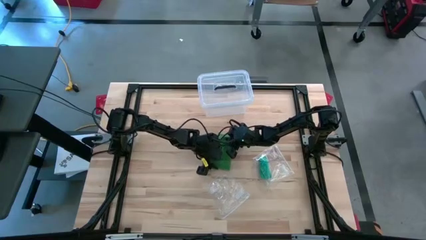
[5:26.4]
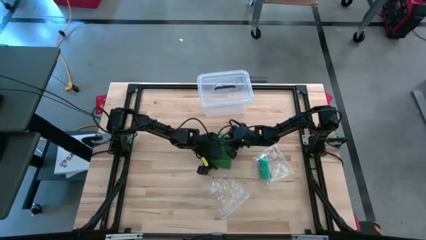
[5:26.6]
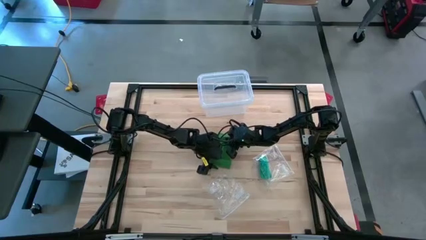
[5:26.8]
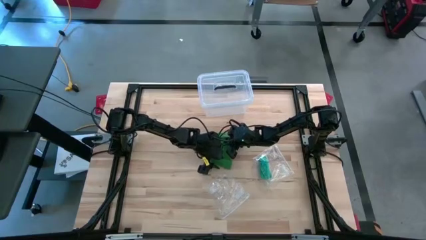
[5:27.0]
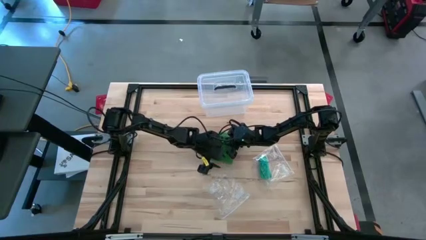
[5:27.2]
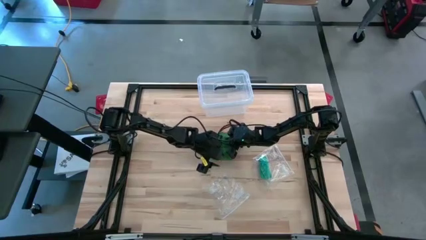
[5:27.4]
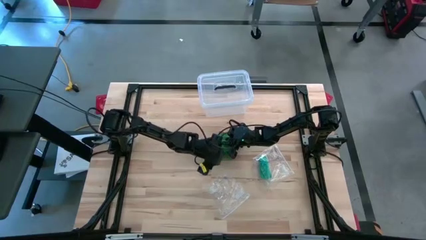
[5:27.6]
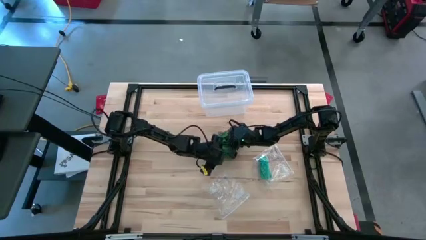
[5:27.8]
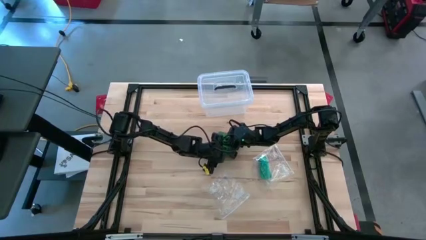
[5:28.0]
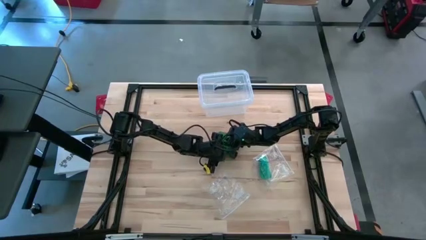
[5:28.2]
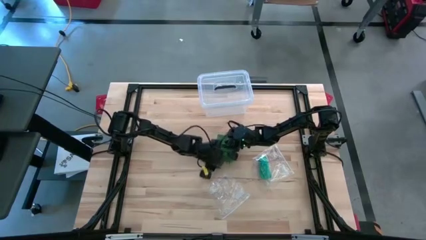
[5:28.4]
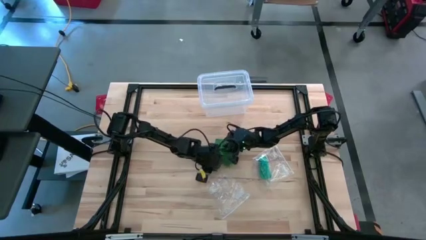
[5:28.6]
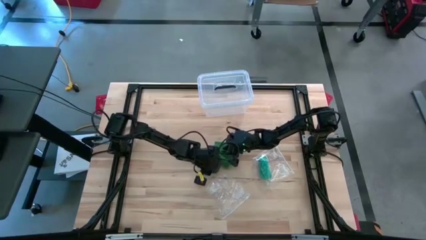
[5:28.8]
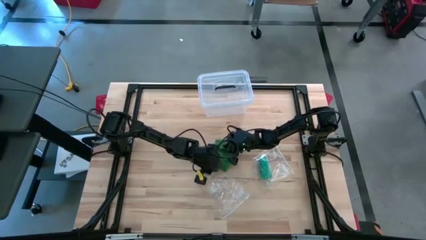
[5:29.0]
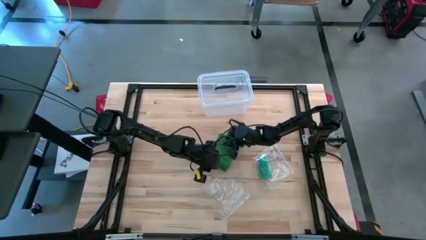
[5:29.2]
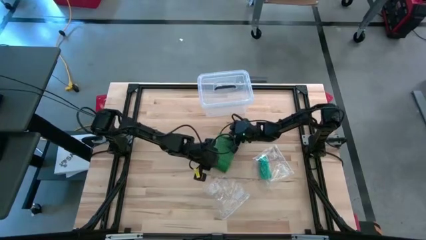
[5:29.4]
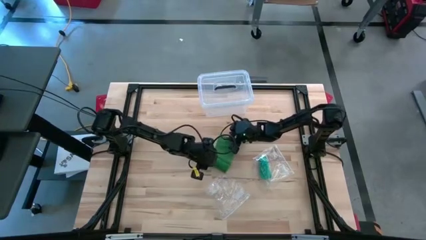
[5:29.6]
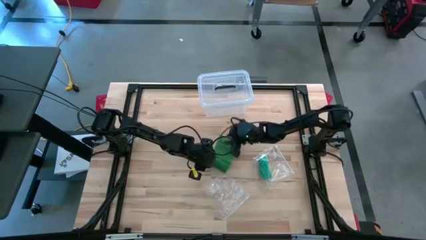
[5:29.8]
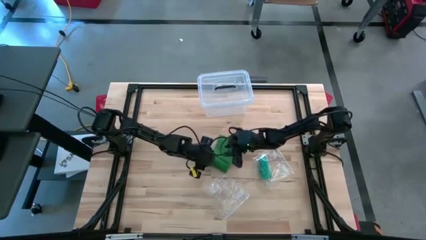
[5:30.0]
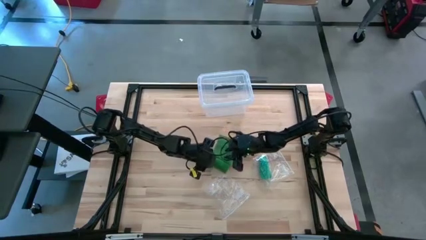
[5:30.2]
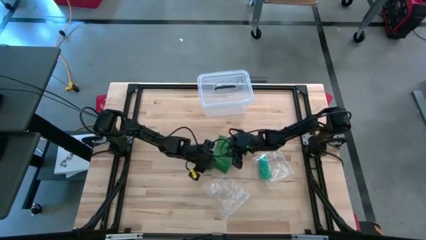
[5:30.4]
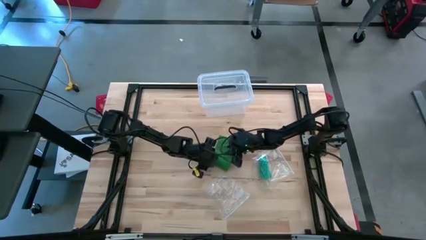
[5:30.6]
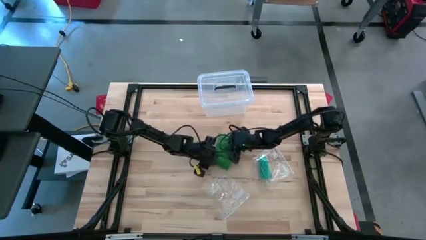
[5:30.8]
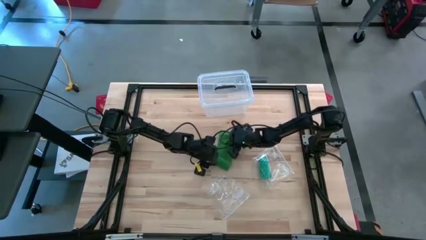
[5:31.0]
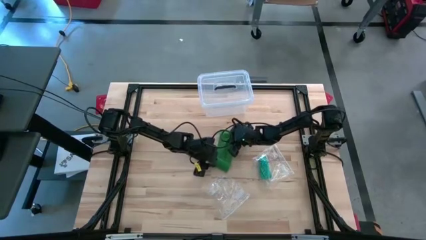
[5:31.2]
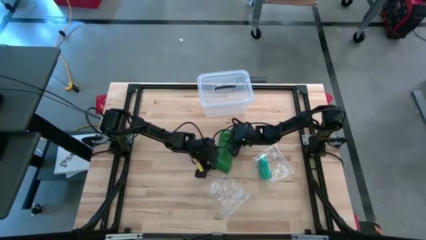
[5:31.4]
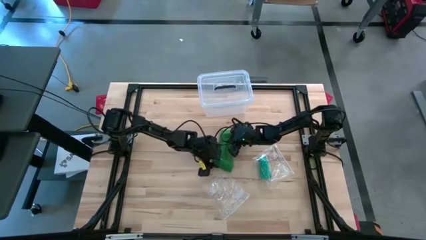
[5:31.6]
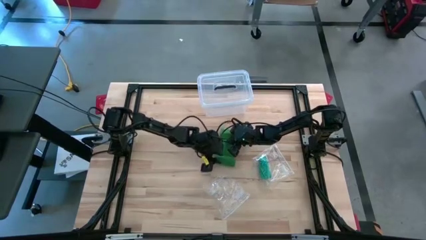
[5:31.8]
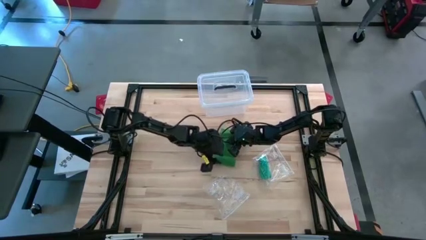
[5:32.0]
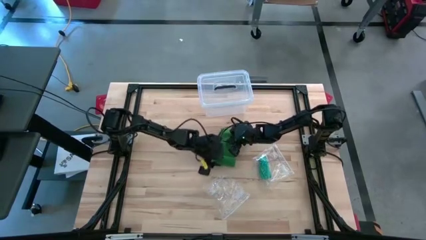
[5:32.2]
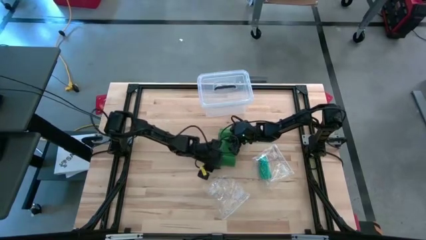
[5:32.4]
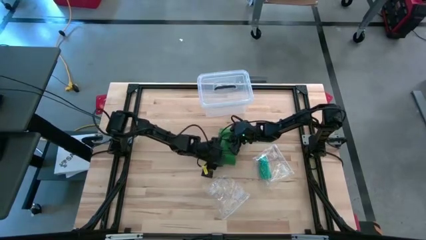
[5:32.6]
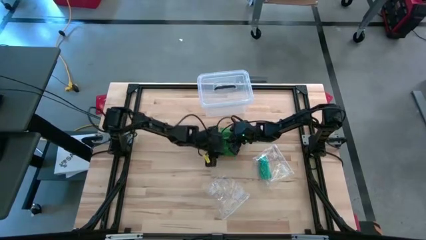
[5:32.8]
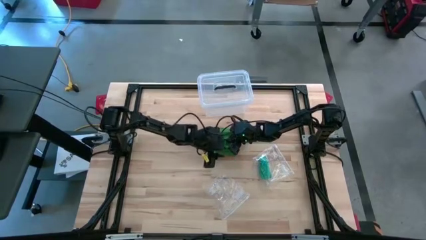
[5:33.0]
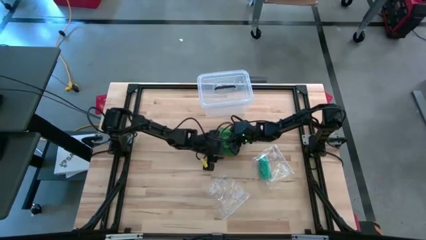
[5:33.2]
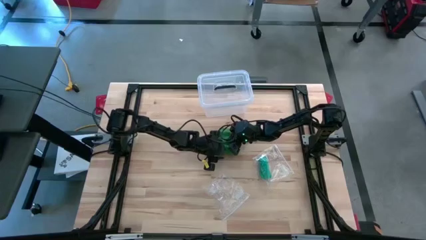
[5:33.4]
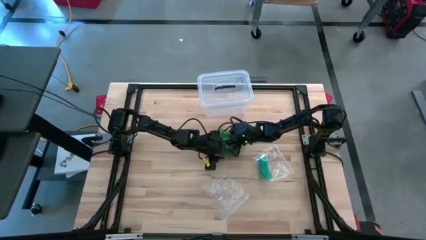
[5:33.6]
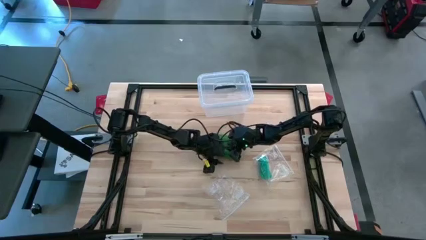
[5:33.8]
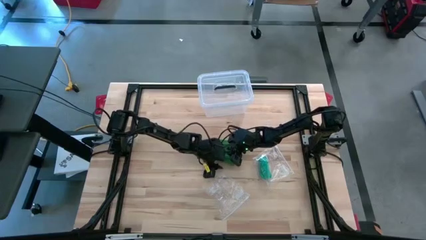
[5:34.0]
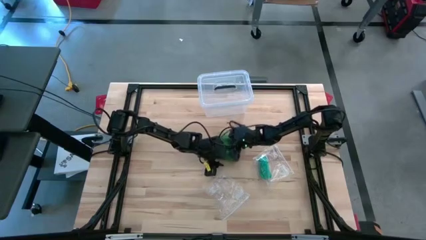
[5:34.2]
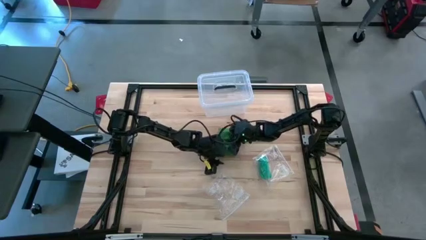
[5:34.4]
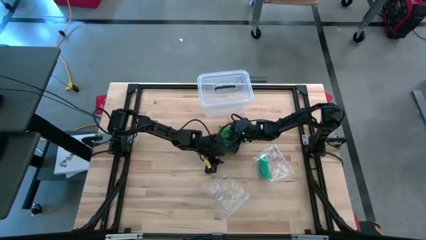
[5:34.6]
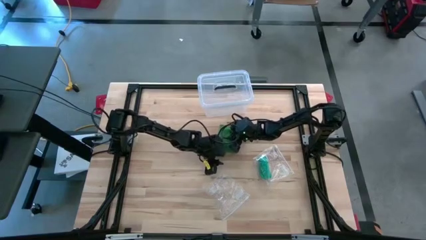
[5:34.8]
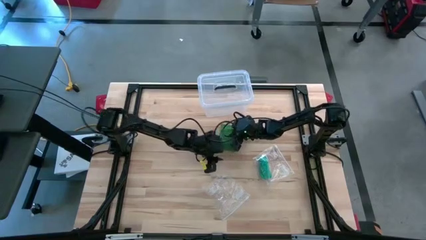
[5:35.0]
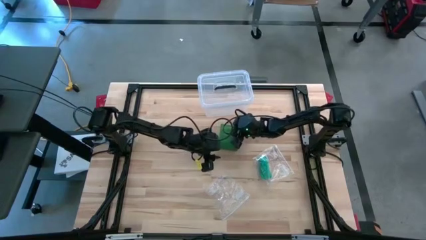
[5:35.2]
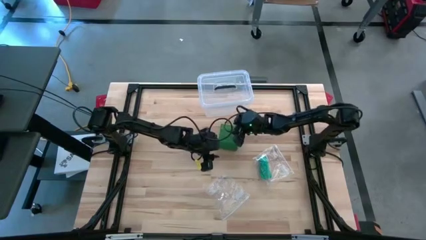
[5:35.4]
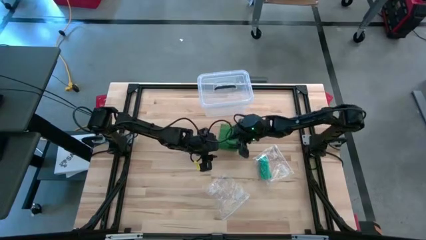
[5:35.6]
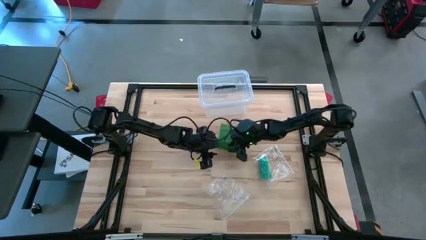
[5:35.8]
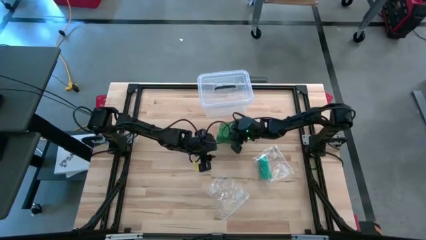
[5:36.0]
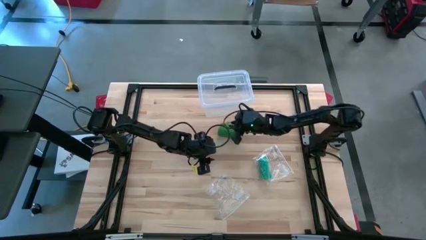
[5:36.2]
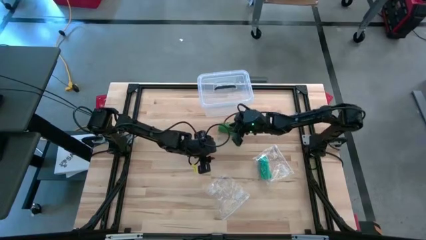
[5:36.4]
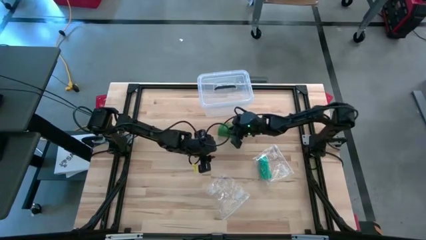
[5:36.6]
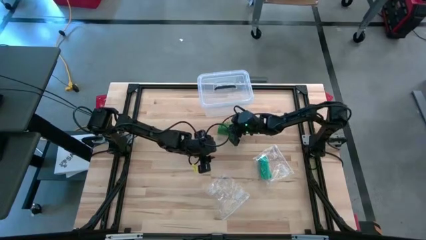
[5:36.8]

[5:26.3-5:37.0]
Task: Roll bandage
Roll the green bandage

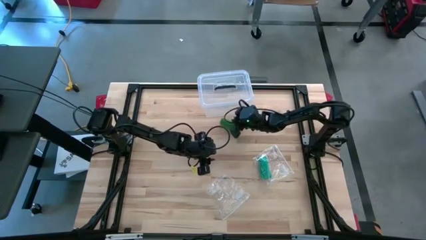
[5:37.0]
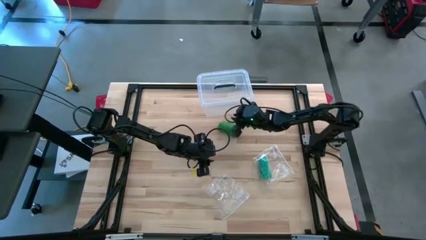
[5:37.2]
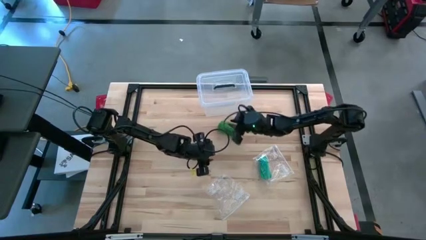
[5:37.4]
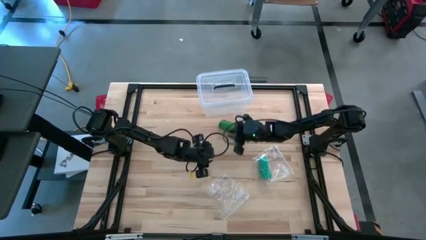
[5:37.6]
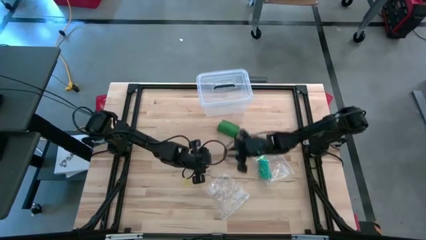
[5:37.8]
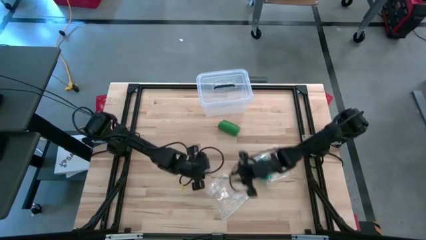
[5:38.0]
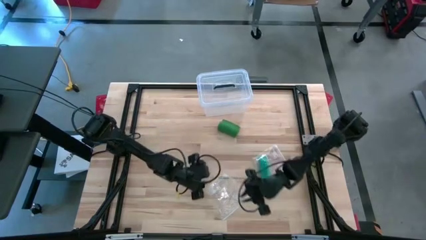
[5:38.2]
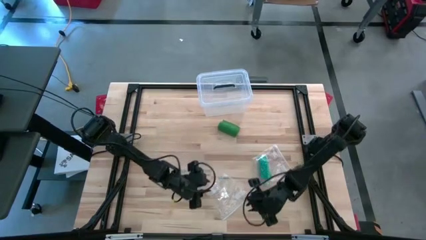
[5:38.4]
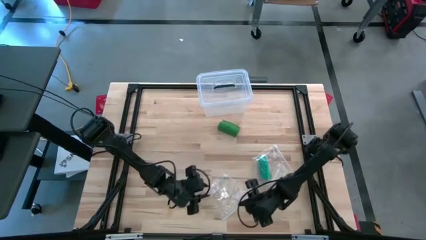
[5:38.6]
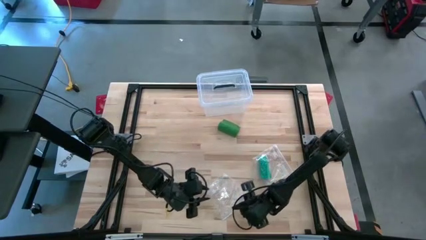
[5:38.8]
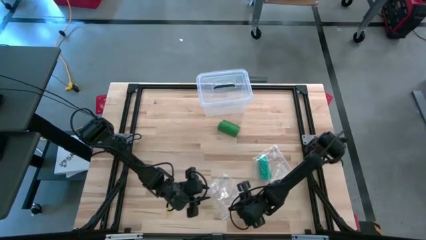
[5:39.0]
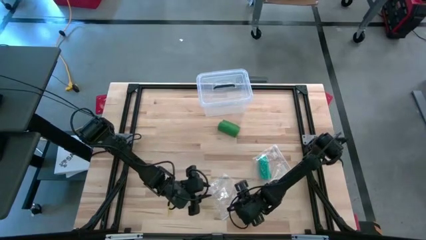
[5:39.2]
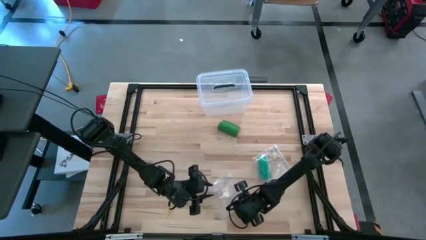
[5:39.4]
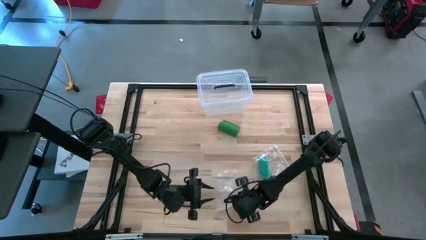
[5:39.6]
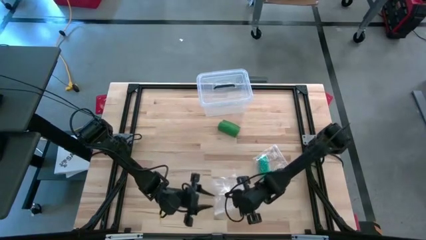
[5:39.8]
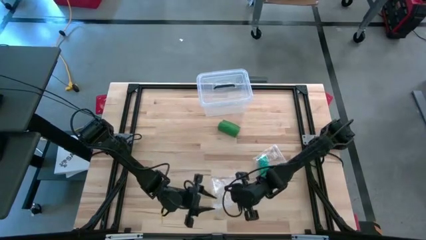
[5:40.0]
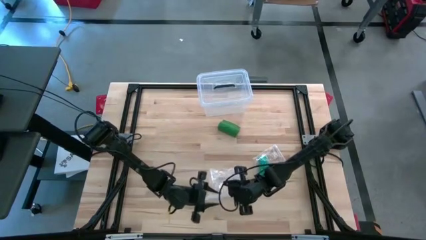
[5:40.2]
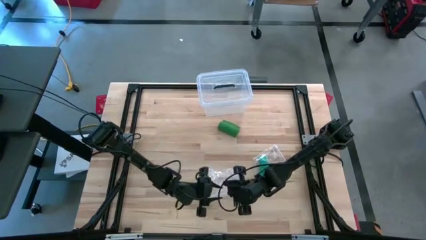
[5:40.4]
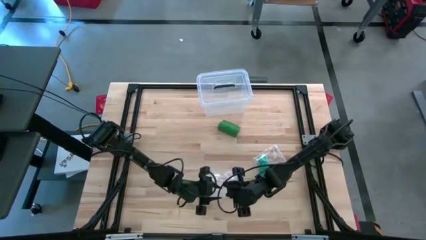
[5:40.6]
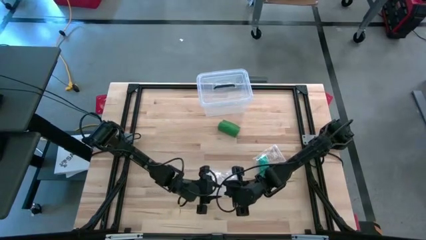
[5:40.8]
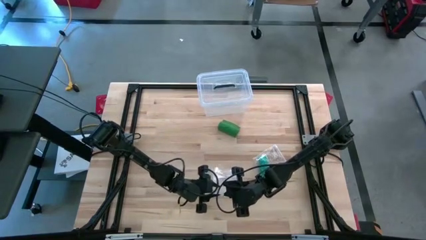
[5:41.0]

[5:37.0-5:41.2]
Put the rolled green bandage into the transparent zip bag

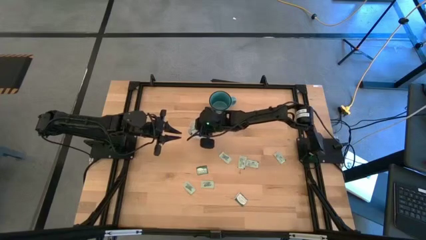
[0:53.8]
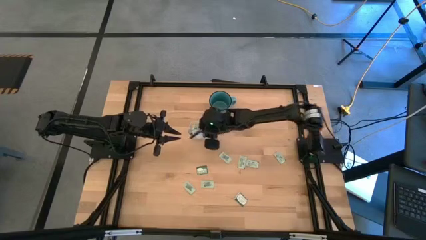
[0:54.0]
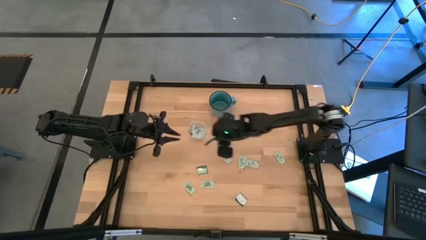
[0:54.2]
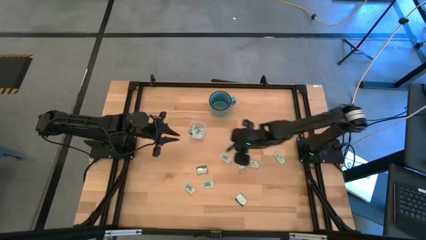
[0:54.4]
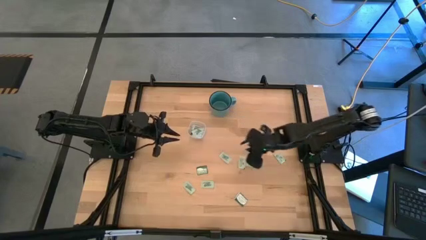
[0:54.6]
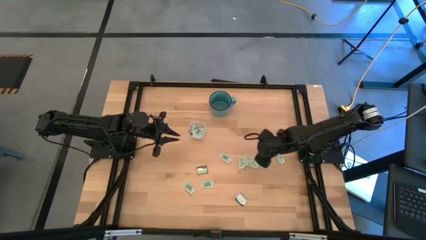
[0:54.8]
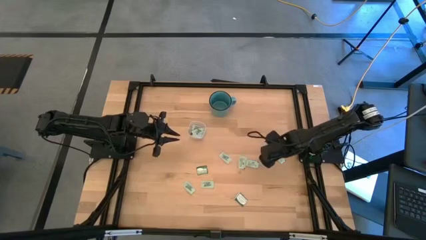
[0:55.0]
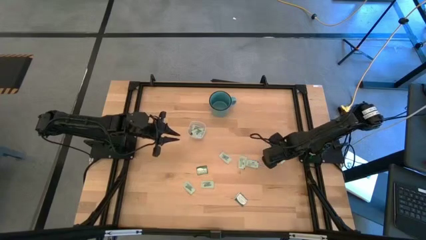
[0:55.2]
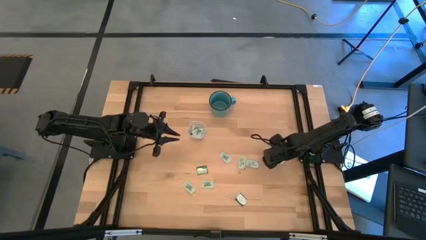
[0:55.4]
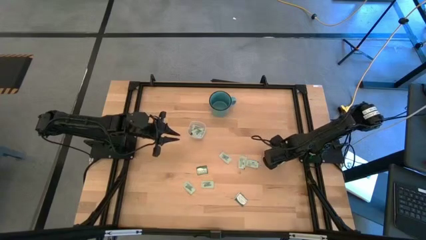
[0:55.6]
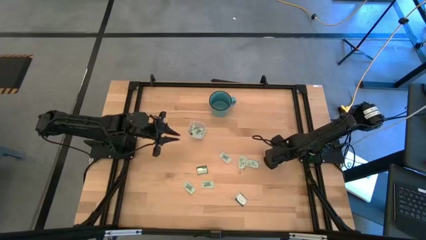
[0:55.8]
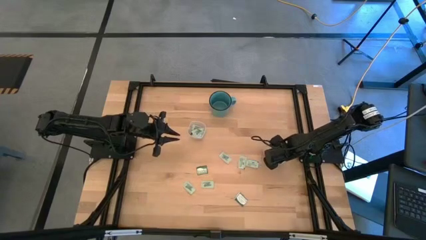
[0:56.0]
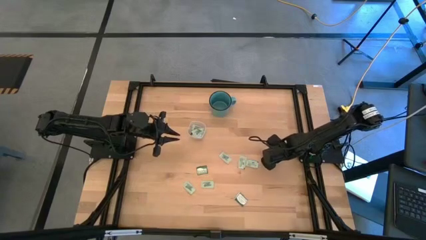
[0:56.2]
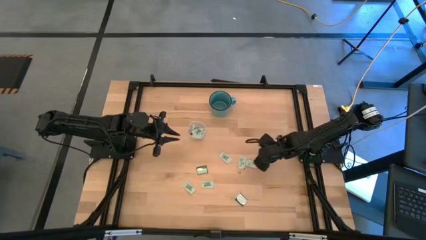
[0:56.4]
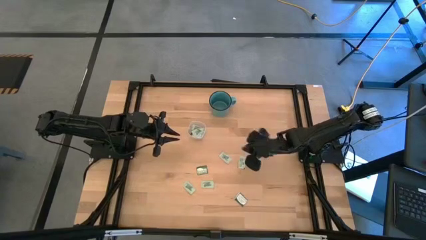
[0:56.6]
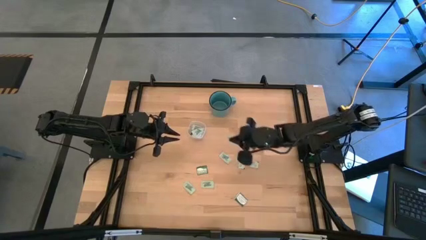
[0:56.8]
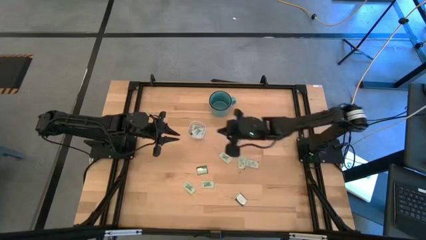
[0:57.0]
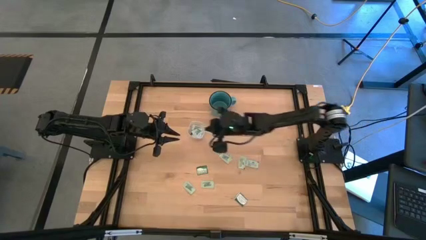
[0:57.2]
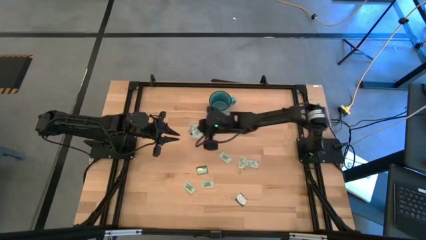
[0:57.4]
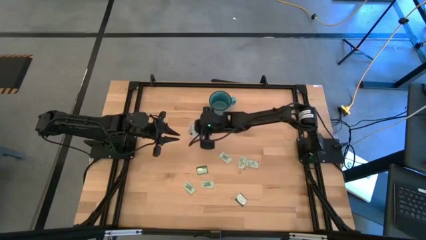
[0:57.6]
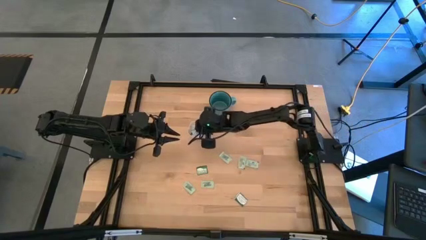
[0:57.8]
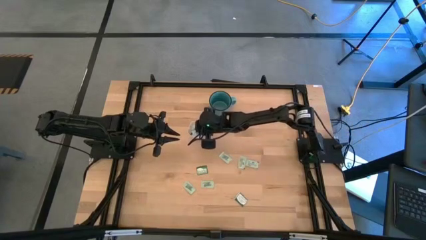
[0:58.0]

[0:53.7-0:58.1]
Task: Pick and place Stevia / Truvia into bins
Put the green stevia packet into the transparent container
